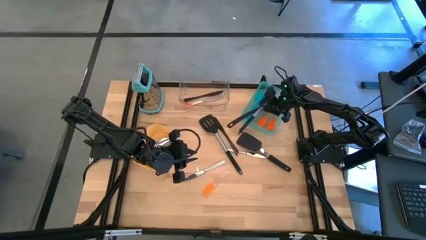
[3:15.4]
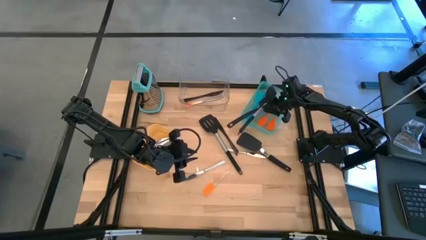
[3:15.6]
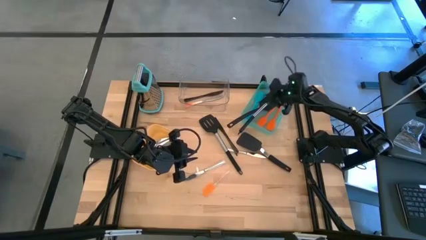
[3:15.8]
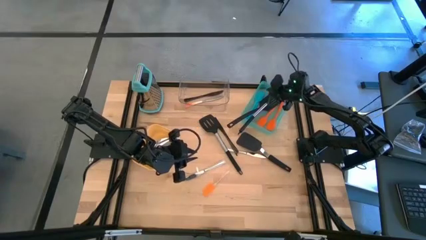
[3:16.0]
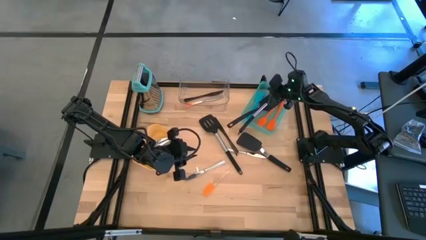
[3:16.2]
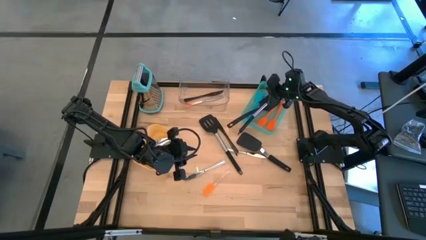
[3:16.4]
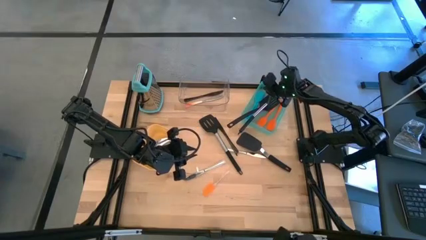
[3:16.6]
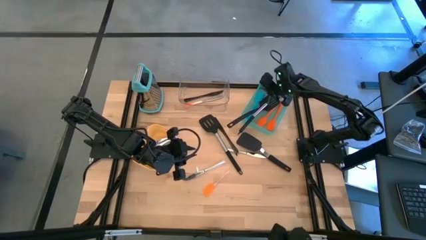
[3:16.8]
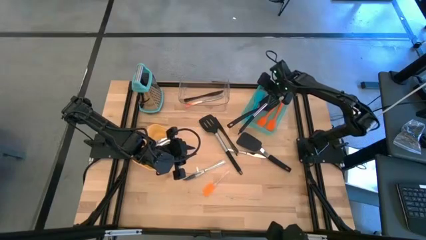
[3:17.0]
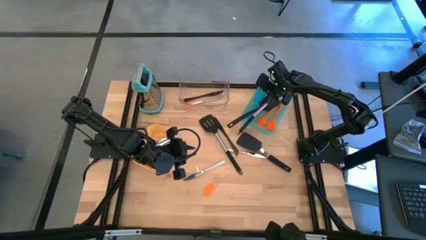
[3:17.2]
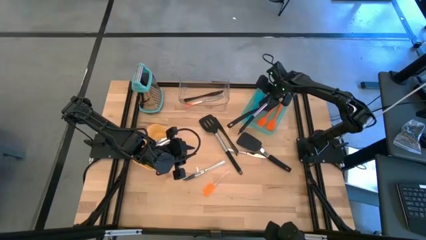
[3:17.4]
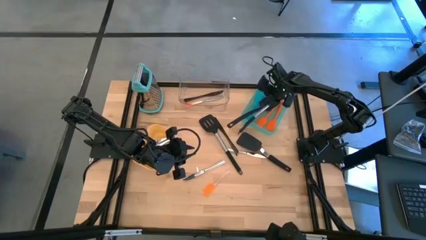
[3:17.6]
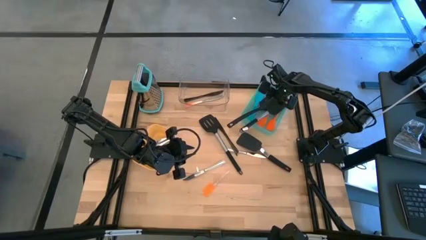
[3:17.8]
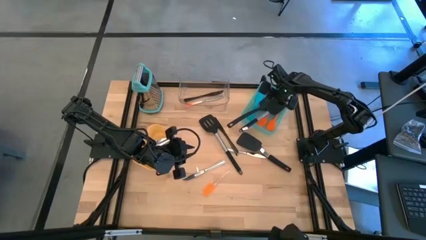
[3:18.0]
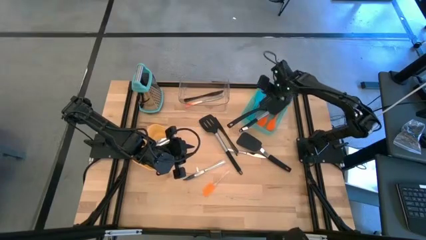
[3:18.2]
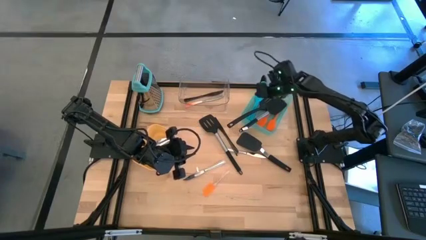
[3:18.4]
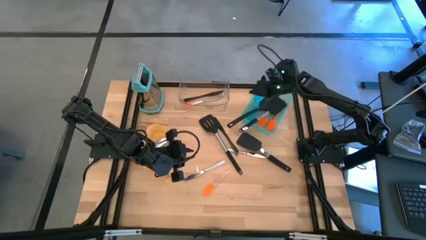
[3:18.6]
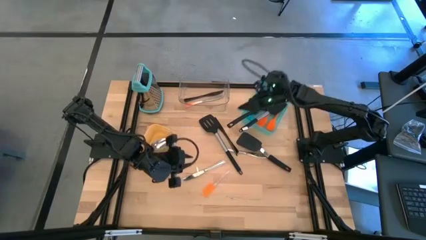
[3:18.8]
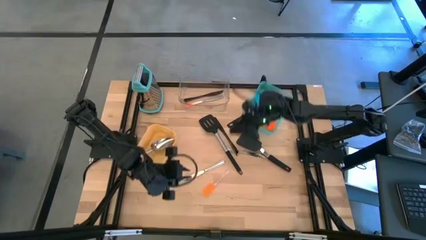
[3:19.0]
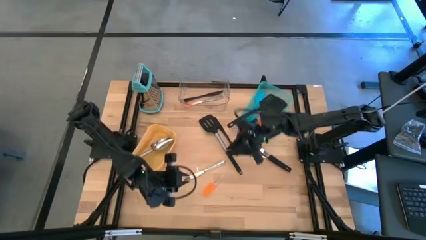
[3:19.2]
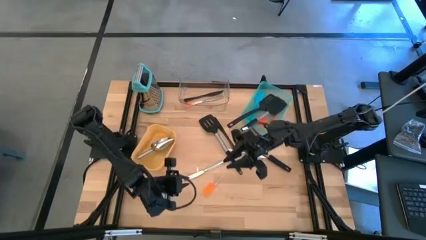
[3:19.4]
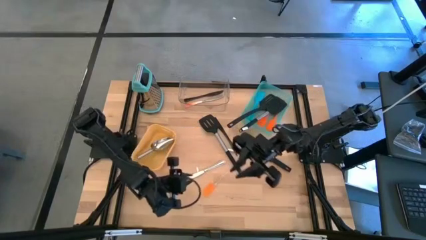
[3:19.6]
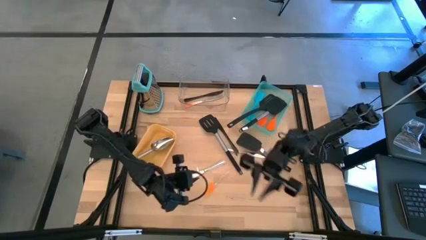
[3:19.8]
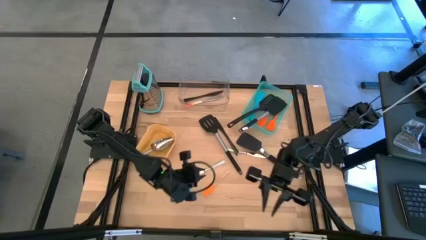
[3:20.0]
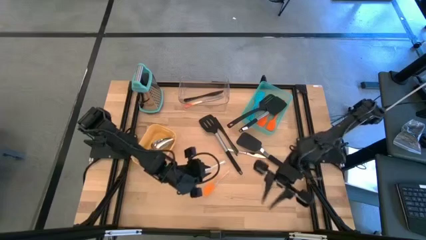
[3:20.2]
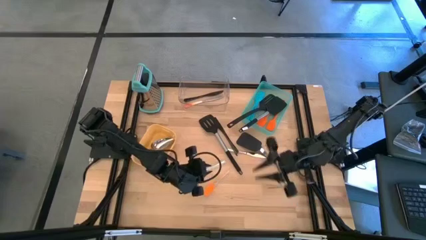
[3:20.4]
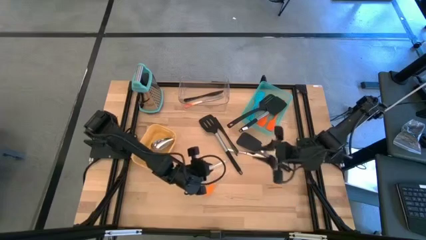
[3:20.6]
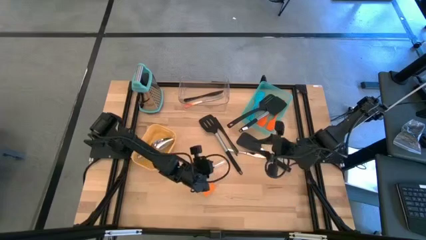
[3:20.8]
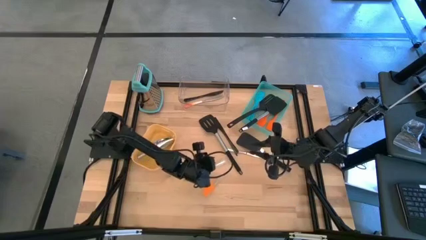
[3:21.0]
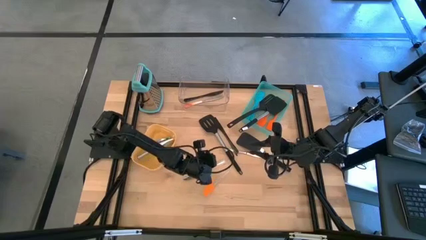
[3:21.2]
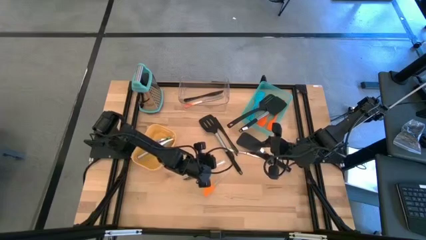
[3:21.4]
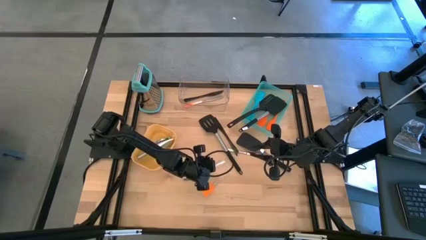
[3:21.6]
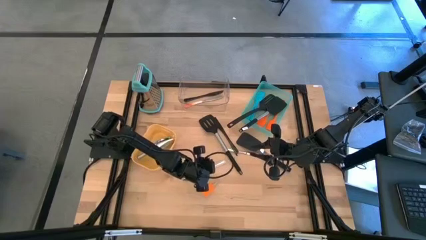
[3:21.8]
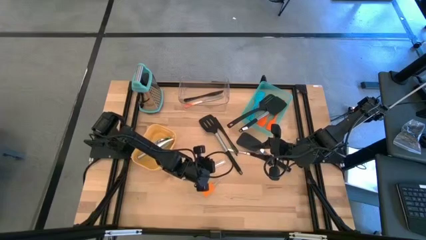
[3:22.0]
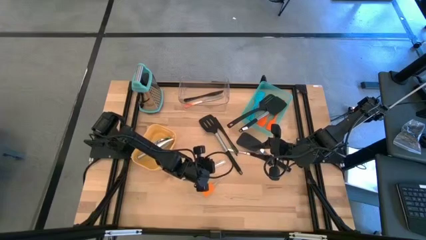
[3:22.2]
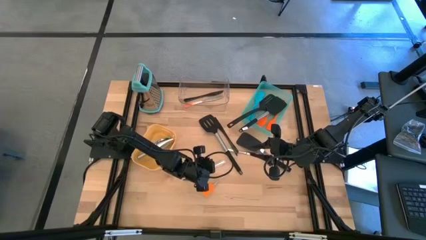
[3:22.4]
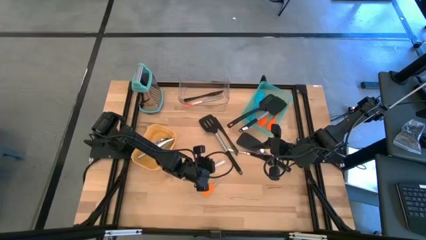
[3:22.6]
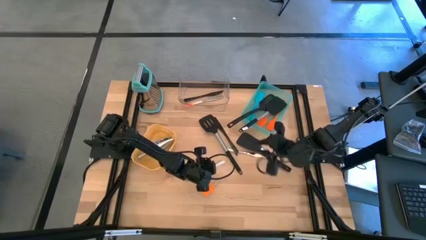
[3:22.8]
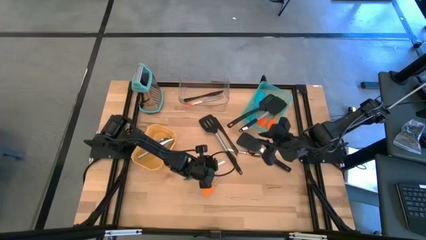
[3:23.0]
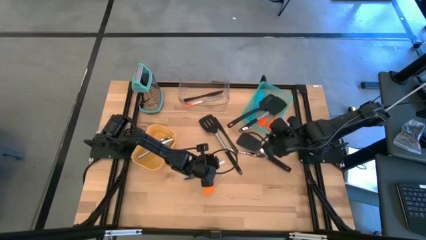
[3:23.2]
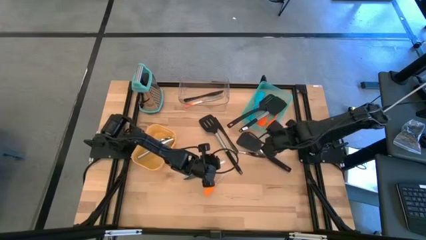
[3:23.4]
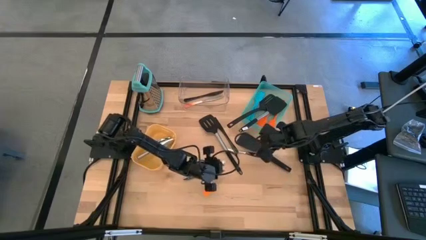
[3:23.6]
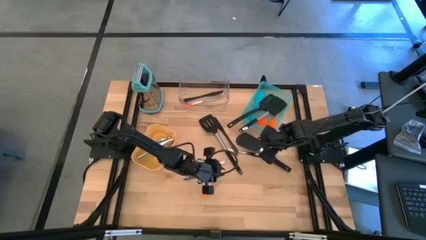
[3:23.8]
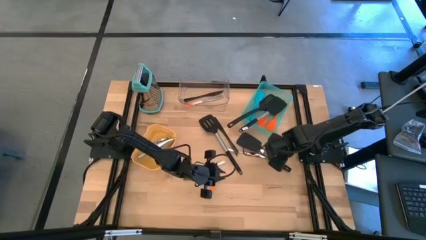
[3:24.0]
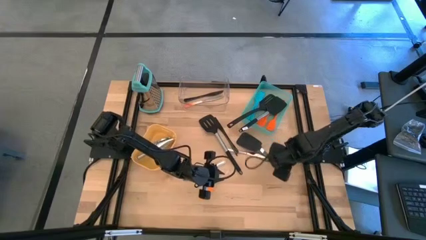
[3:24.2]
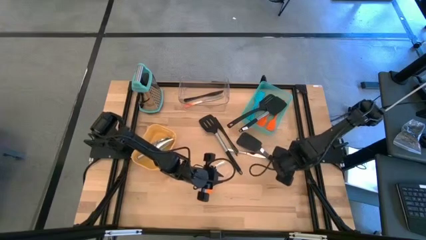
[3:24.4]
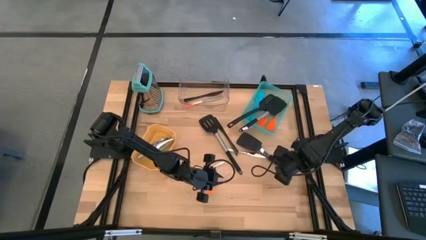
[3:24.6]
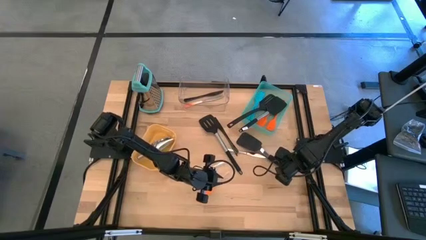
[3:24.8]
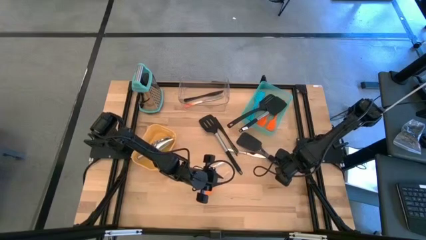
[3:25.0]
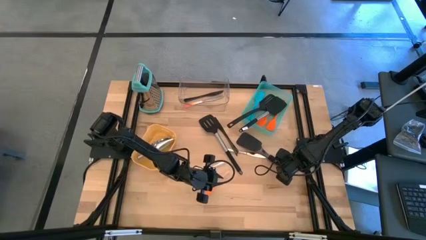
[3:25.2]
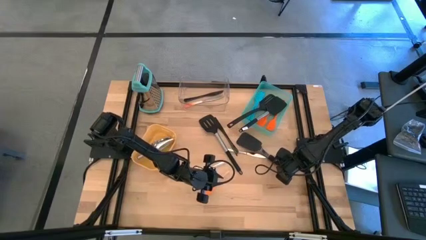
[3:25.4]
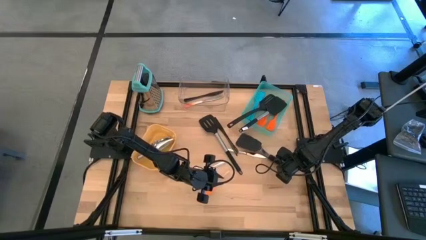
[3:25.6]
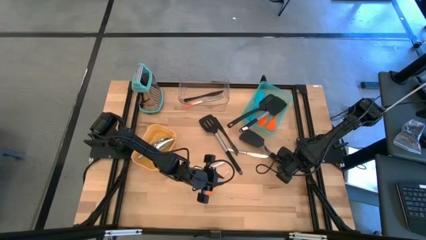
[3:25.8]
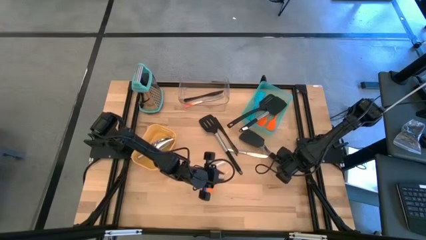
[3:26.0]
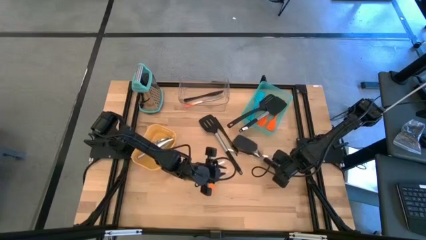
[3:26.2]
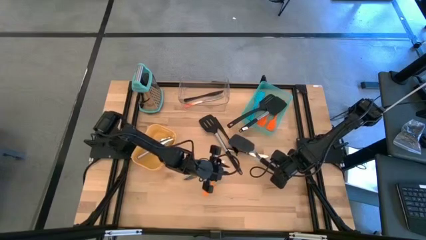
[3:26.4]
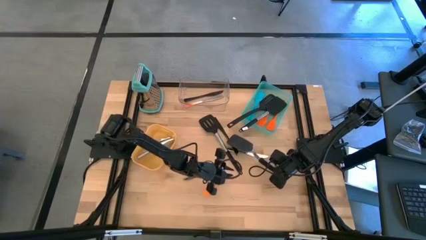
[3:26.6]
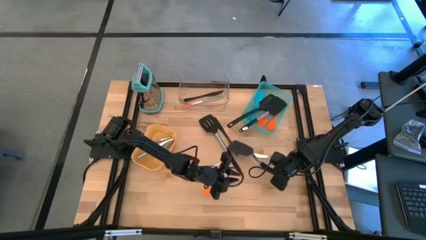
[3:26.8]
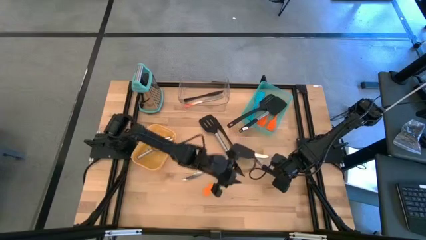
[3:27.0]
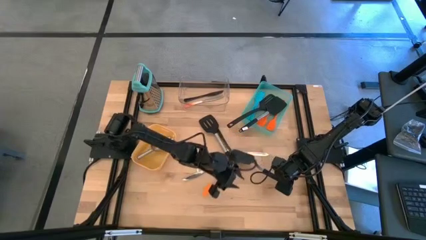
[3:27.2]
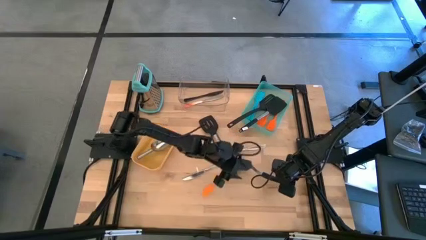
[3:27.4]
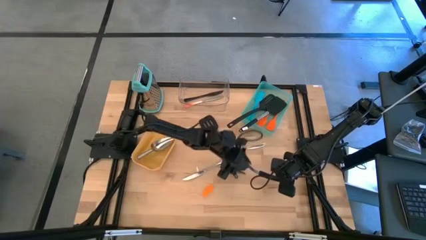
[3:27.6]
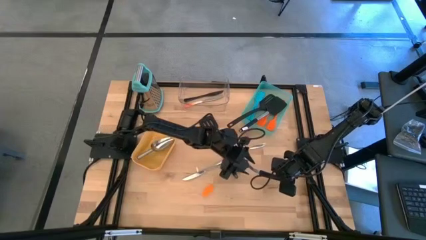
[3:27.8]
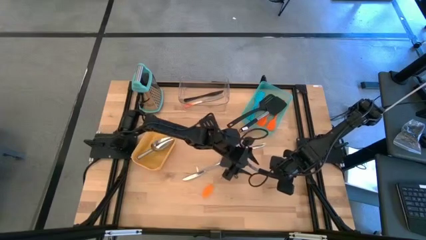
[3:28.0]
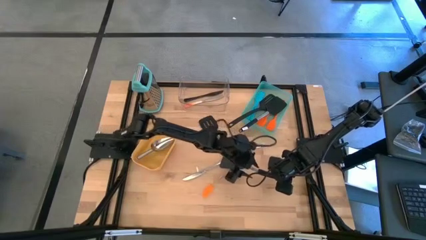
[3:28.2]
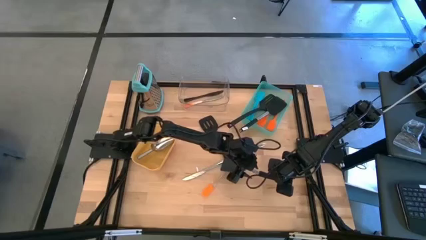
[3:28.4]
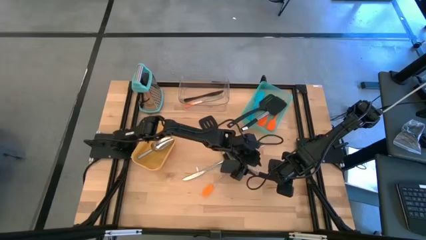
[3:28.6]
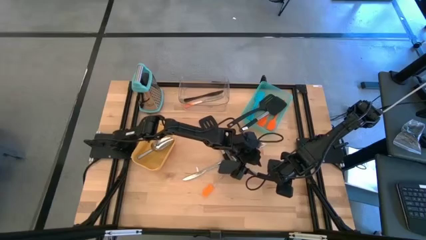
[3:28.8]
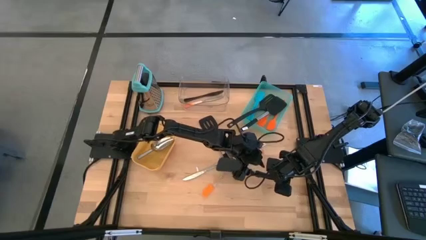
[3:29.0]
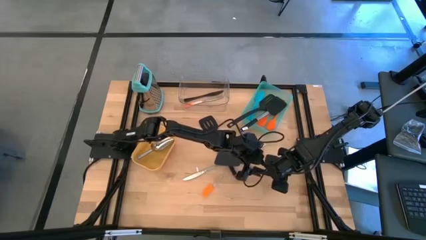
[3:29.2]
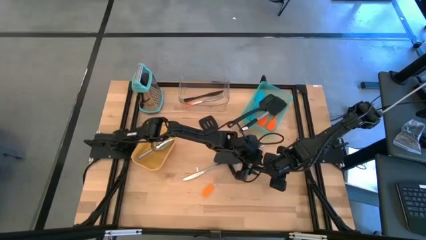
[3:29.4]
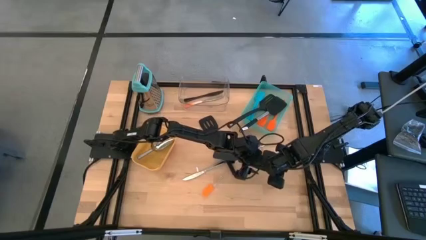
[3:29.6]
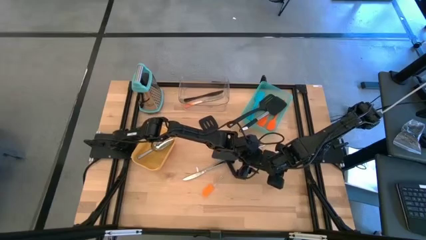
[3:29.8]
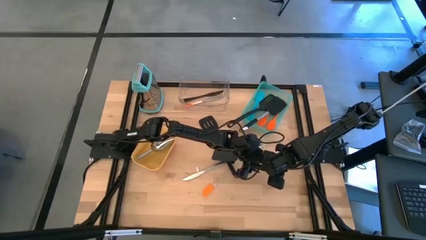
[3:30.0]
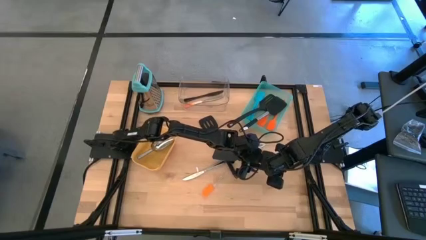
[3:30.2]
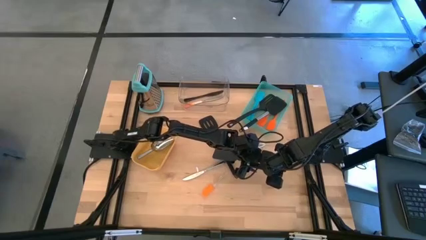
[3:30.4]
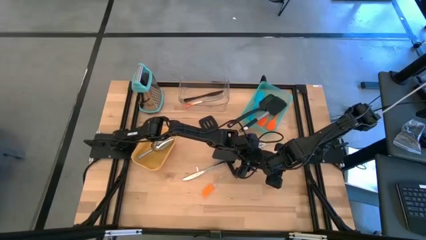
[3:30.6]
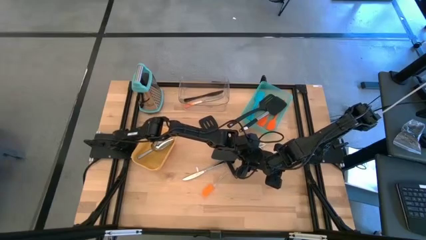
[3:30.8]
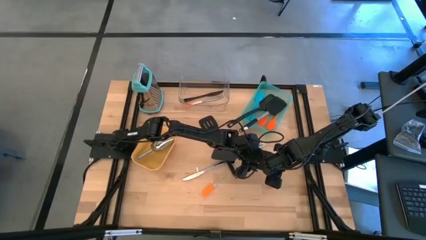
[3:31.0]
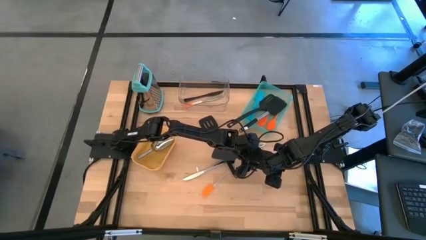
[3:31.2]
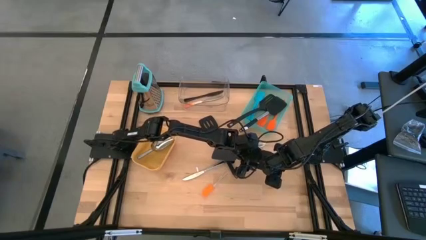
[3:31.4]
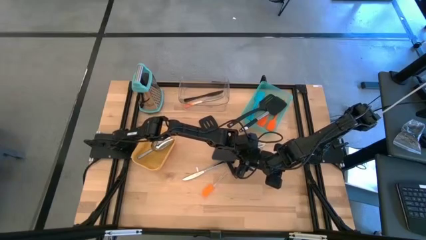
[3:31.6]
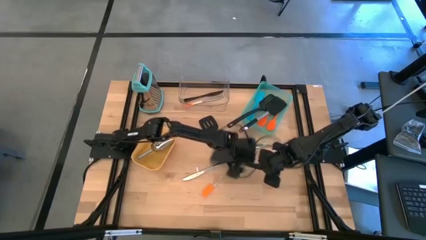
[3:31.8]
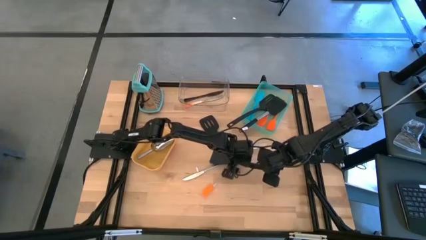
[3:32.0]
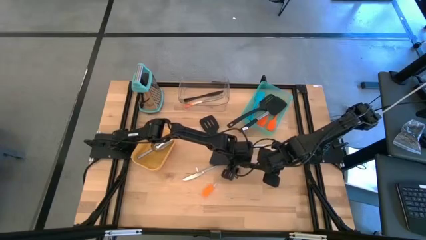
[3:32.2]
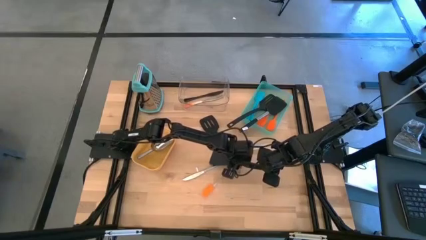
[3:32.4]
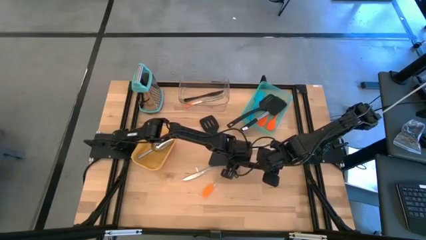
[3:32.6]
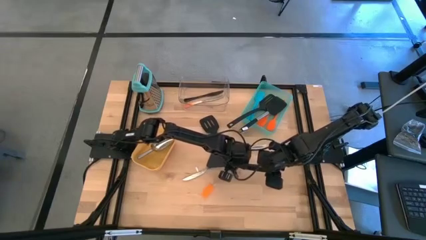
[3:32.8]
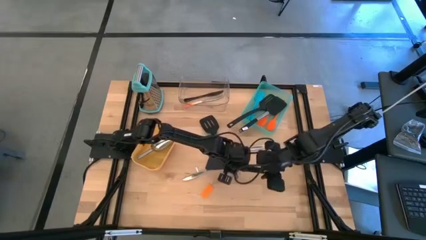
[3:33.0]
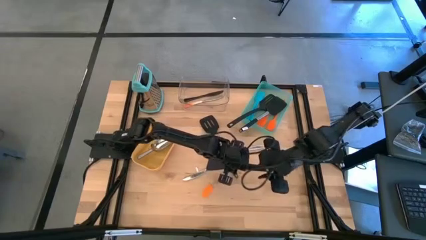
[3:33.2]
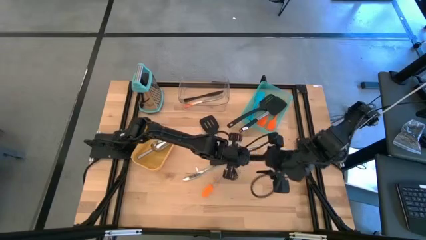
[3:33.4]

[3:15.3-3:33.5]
Task: Pick & Place Kitchen Items
Put the black spatula into the green bin
